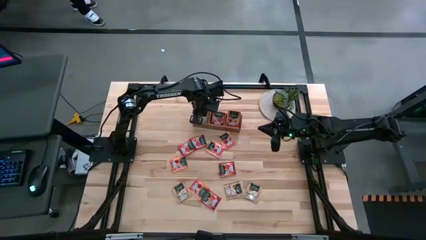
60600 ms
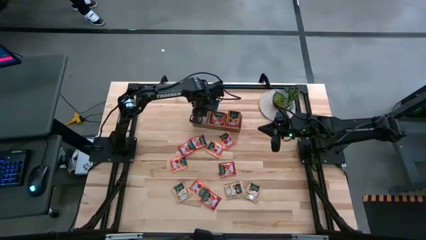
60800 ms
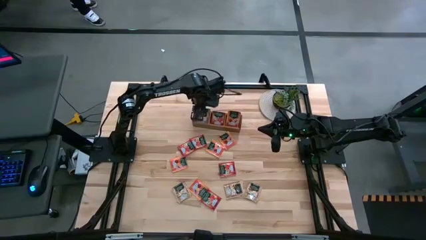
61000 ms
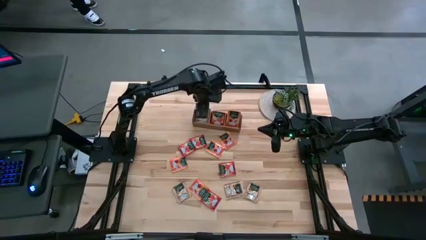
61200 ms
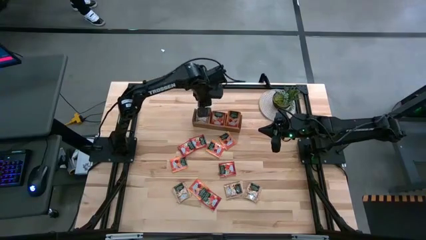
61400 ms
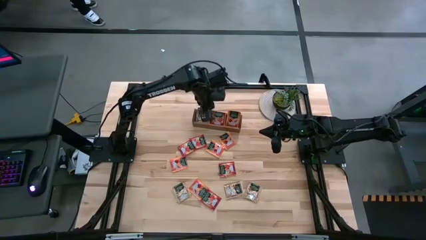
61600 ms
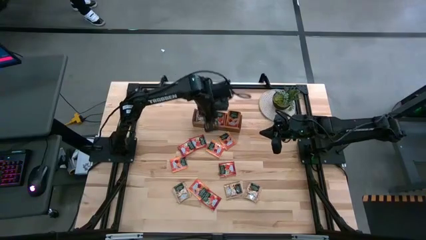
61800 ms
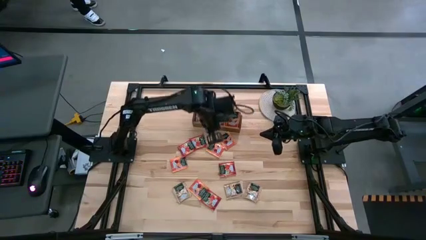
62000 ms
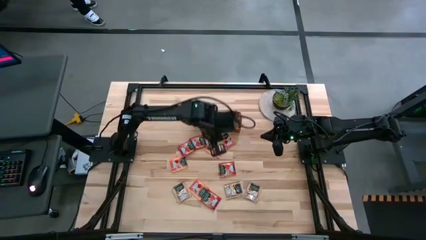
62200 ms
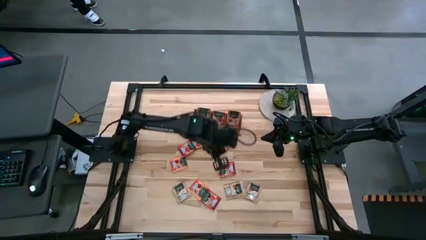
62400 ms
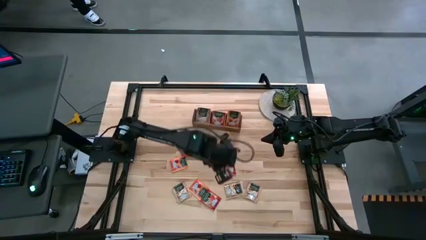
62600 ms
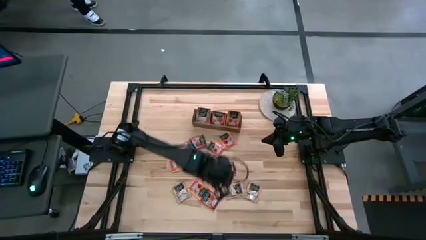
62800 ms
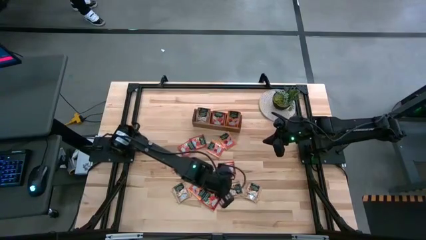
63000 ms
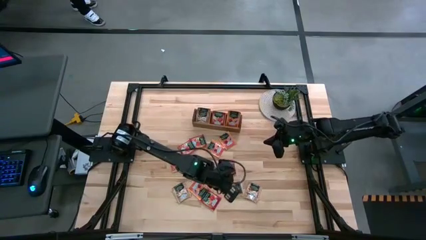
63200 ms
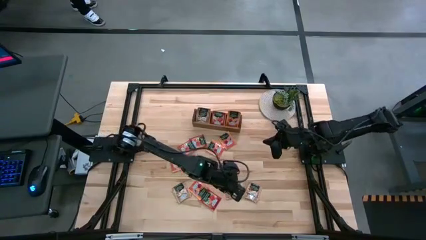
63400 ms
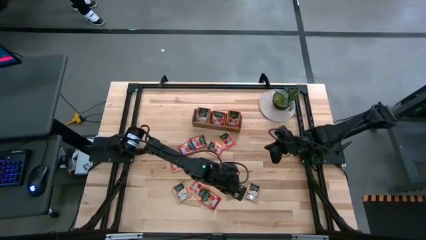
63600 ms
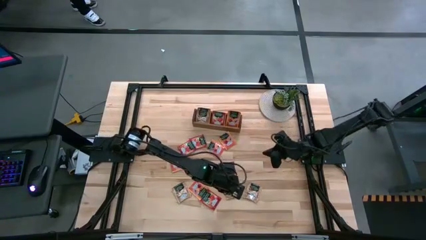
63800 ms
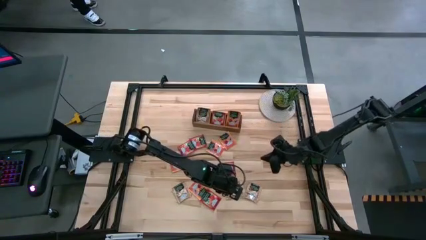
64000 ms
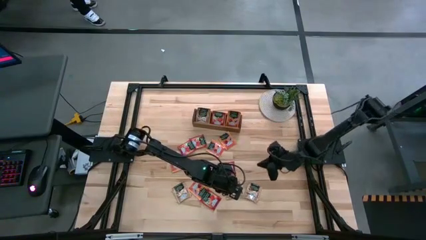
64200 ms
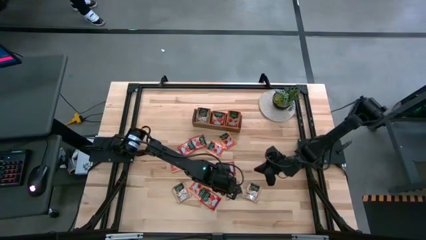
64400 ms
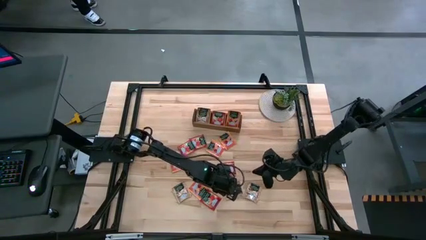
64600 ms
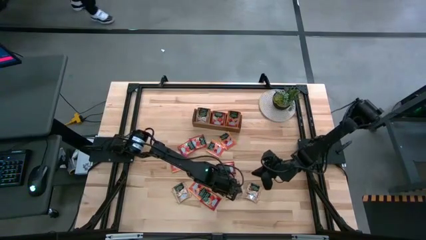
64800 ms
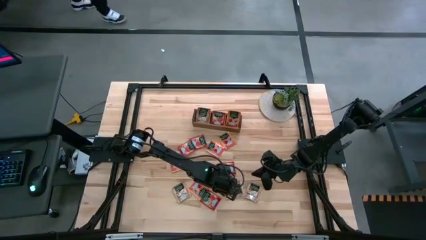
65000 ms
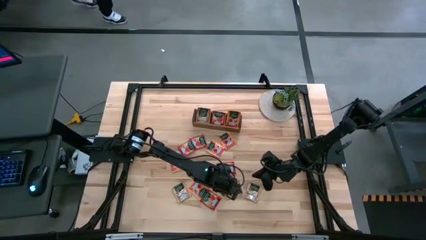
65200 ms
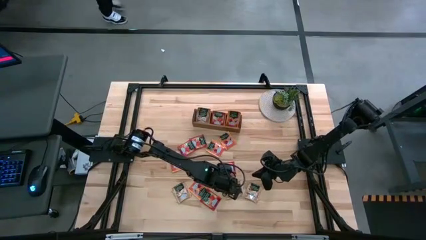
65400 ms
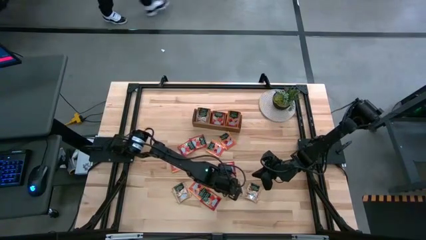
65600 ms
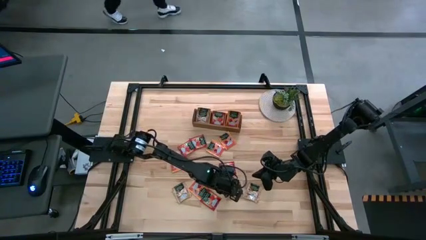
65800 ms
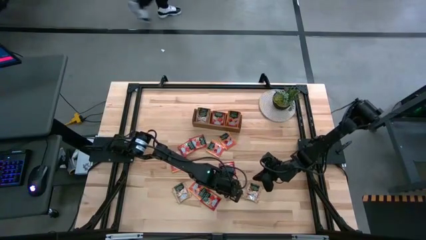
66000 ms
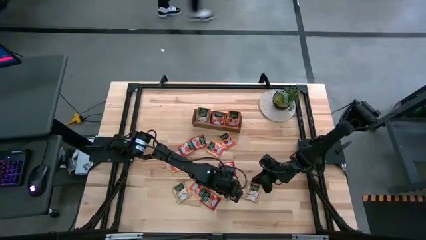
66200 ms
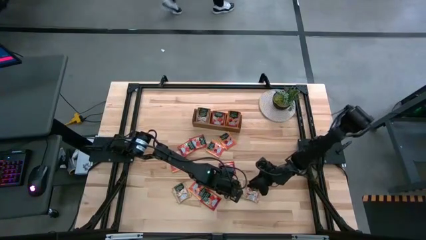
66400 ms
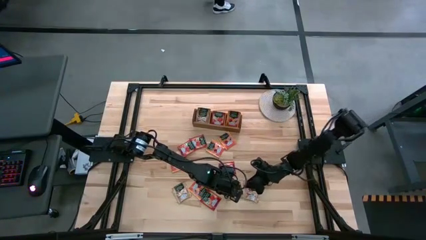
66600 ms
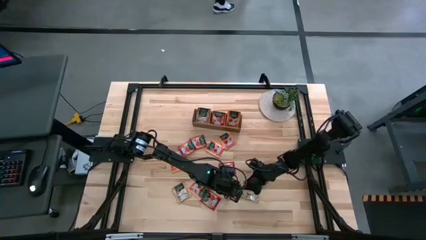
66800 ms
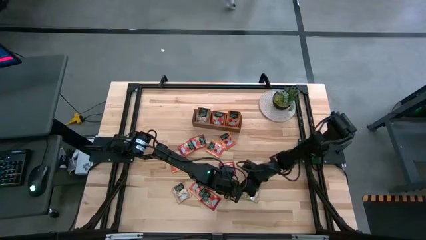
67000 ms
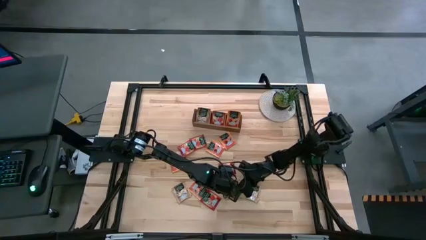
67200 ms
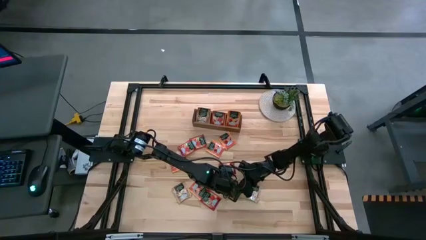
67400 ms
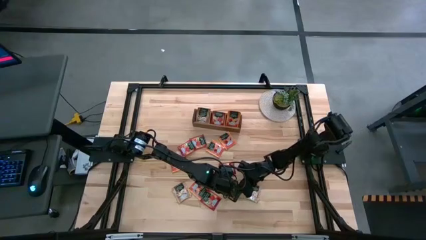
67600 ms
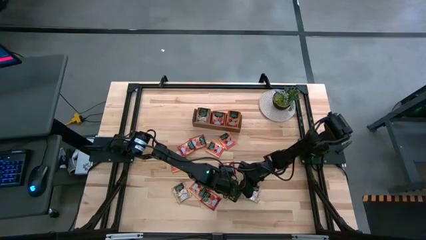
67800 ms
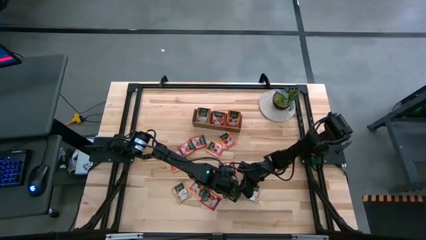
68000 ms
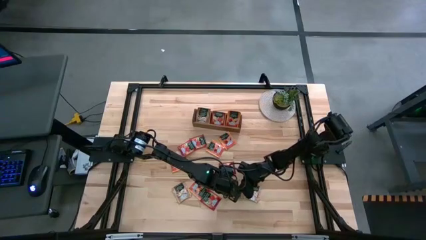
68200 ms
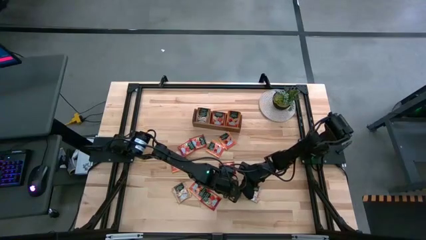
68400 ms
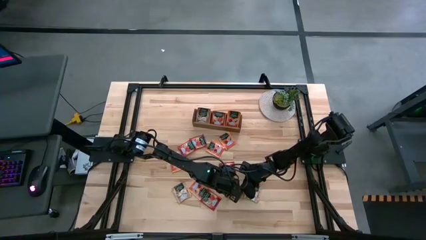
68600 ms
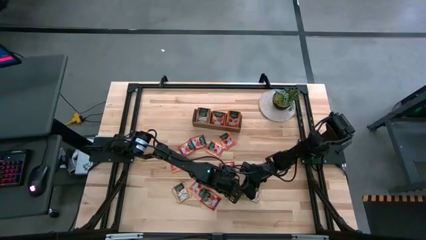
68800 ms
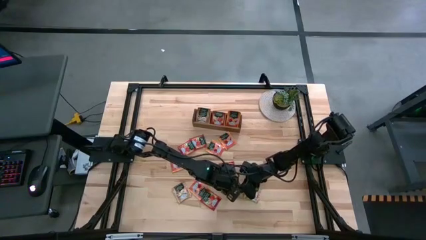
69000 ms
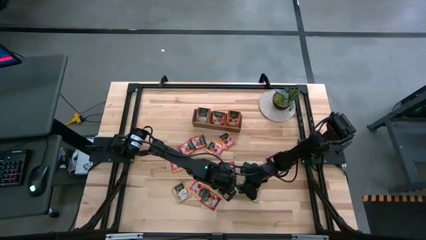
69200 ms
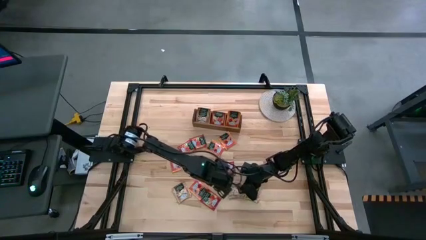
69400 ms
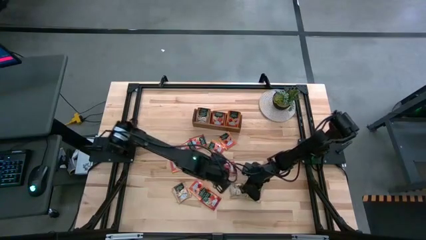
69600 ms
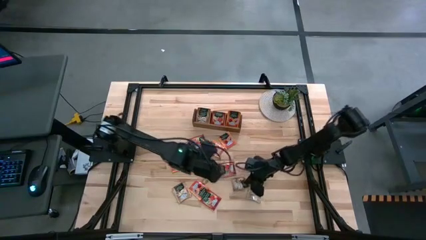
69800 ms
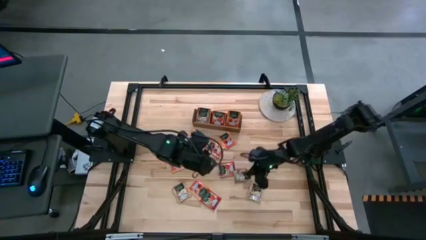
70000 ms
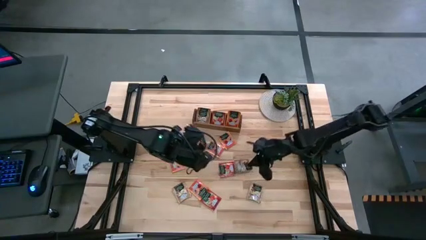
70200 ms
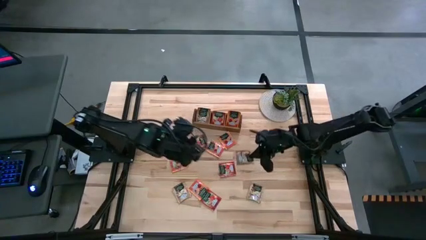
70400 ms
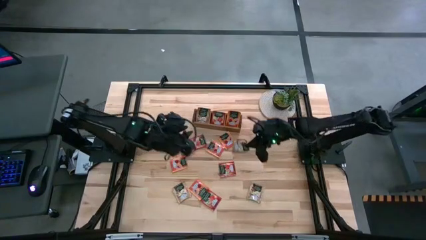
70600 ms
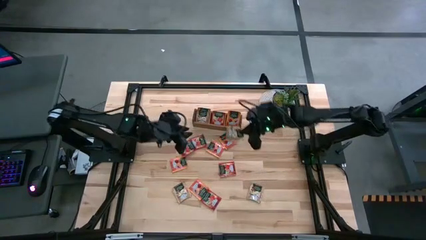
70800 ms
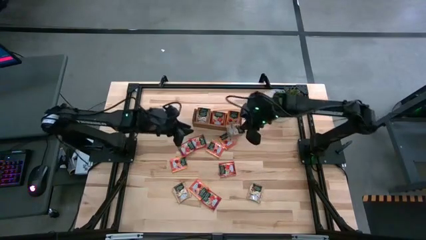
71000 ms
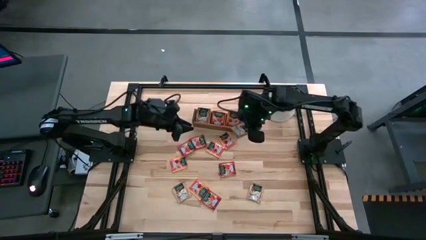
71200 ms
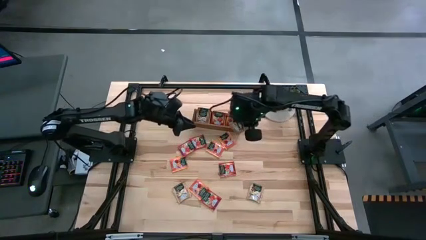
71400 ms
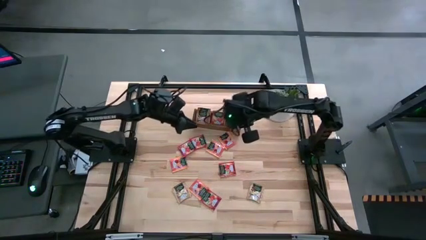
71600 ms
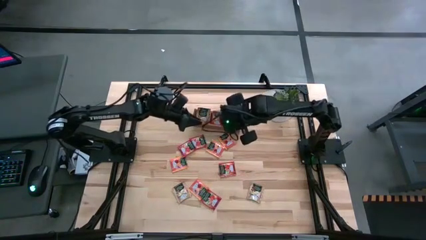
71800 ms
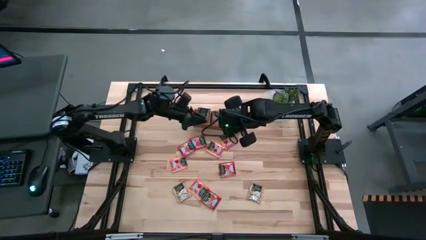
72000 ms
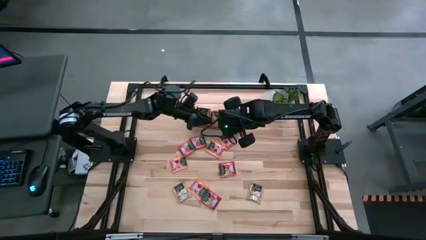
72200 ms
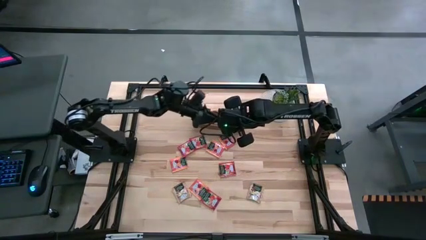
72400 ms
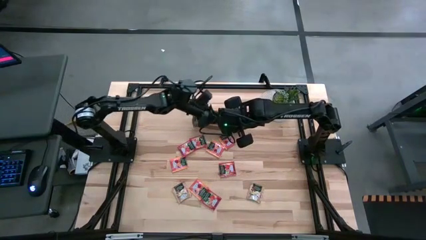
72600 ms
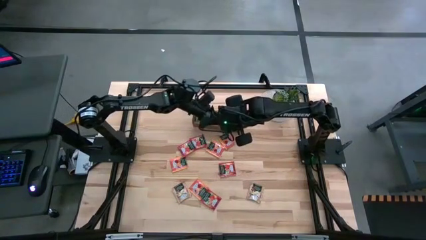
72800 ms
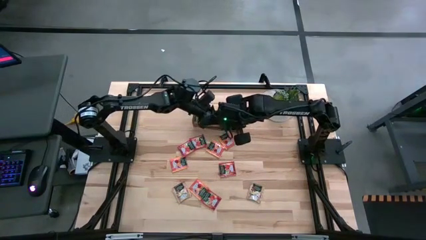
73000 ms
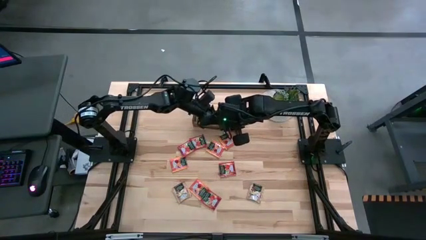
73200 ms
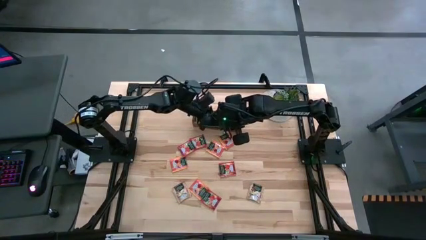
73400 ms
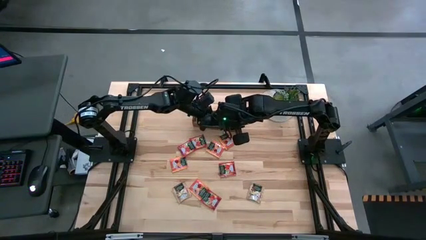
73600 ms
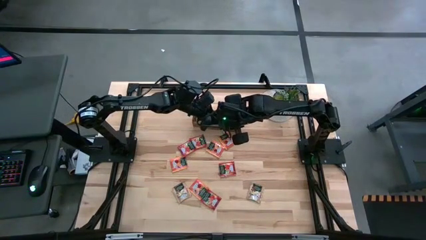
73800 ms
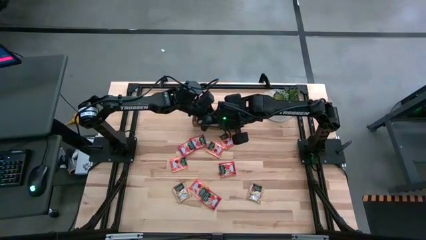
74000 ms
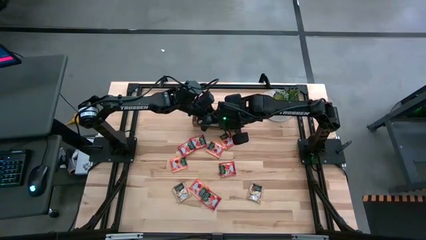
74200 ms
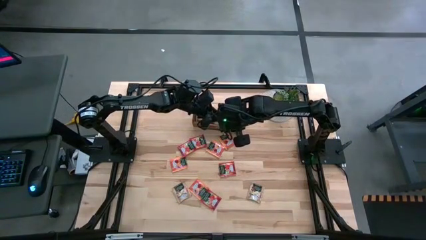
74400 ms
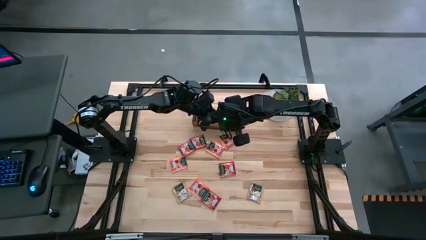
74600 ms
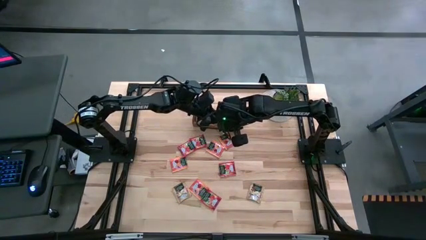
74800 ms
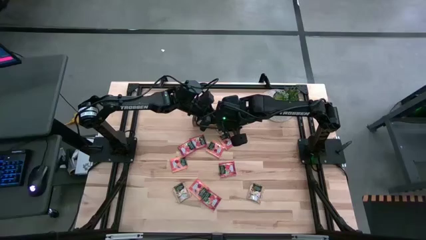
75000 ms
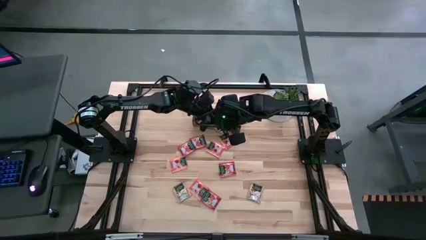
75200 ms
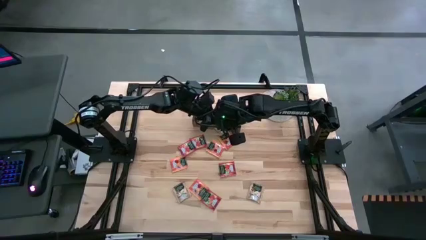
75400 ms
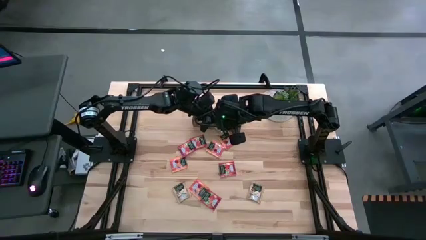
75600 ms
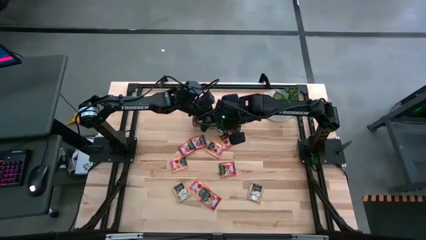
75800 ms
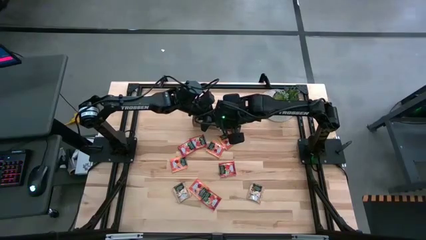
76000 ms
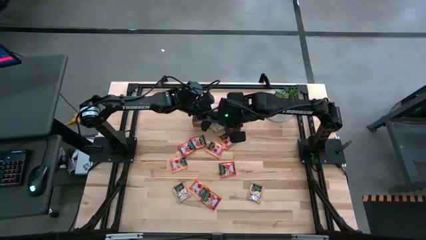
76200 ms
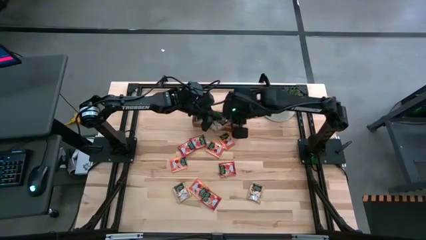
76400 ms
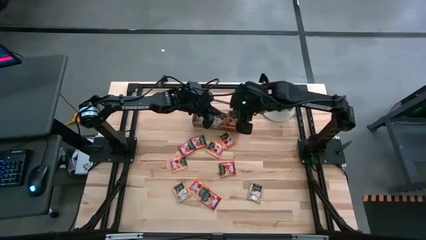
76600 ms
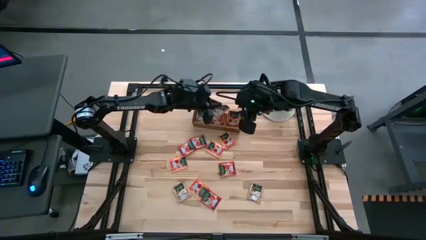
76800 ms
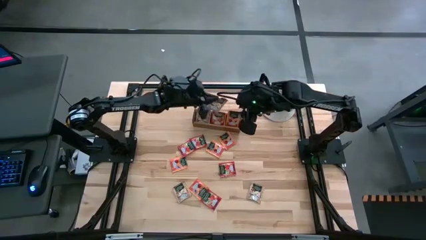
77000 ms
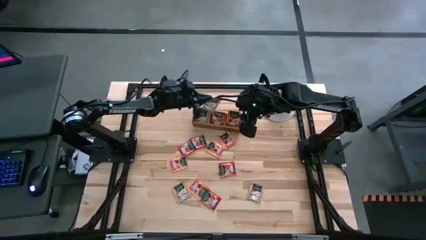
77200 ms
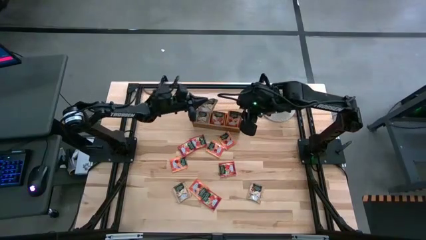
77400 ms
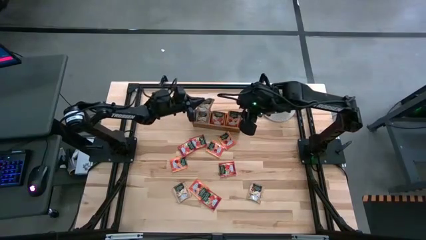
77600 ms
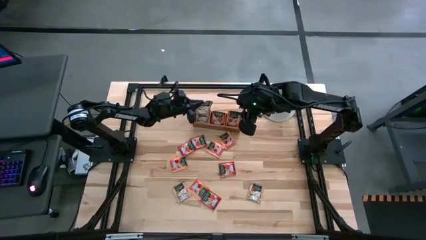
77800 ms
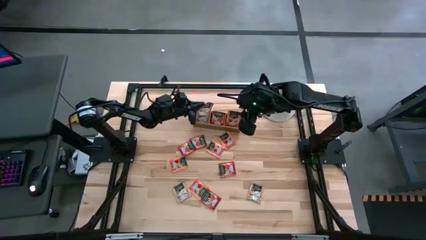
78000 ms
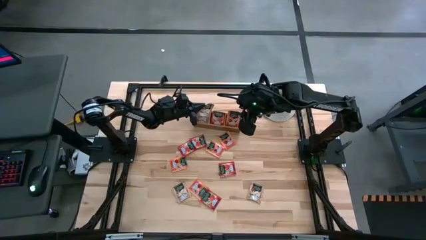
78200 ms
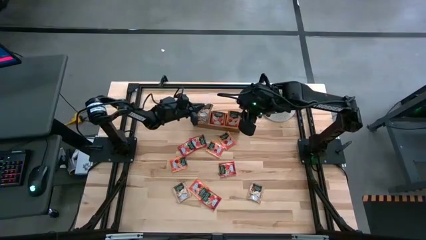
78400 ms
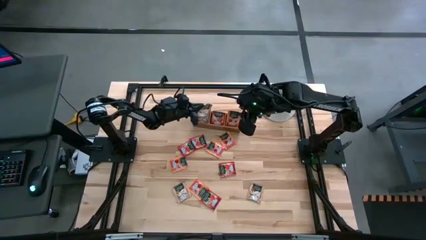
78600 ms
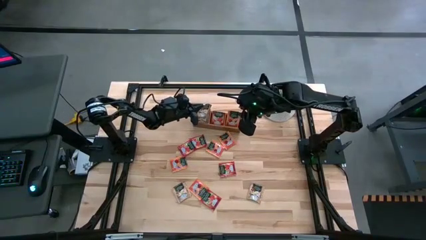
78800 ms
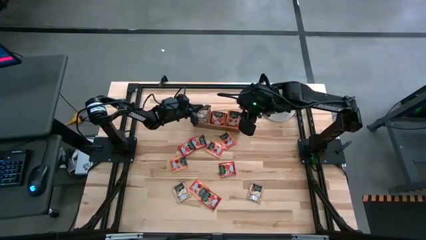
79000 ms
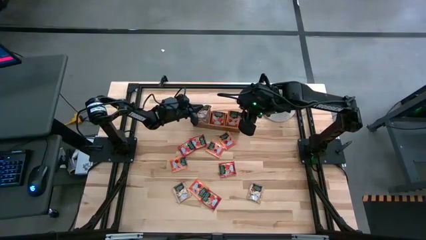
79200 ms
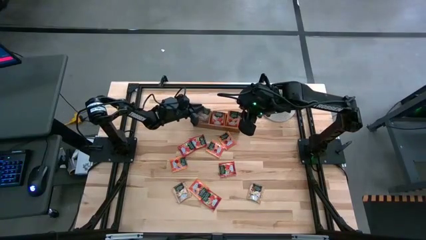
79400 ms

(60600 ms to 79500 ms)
Task: Pick & Place Tea
Put the brown tea bag into the left section of the wooden organizer
